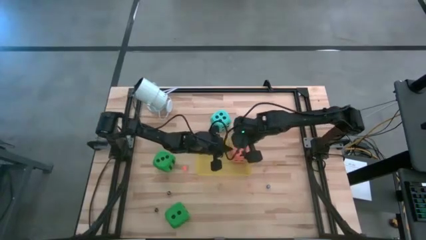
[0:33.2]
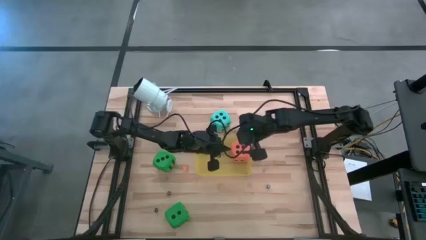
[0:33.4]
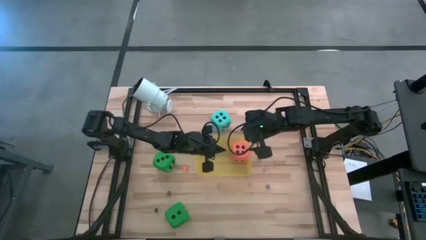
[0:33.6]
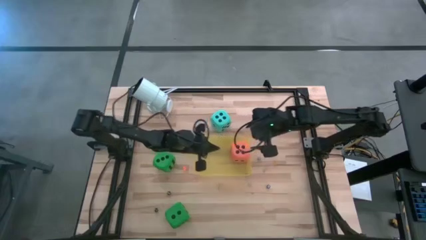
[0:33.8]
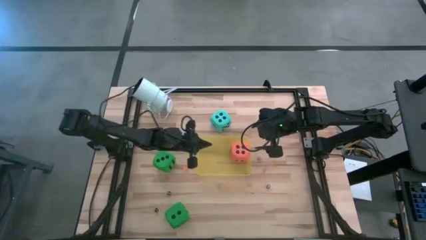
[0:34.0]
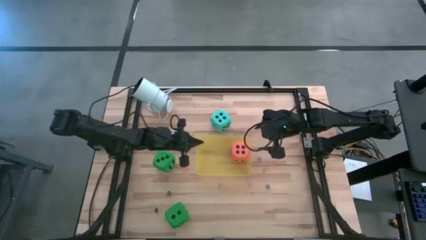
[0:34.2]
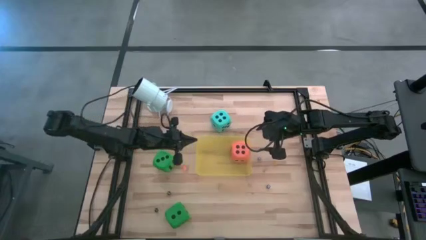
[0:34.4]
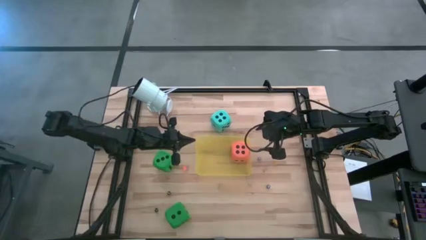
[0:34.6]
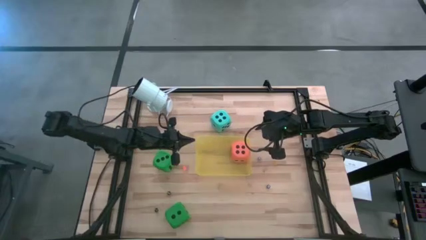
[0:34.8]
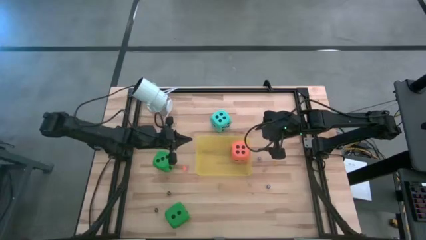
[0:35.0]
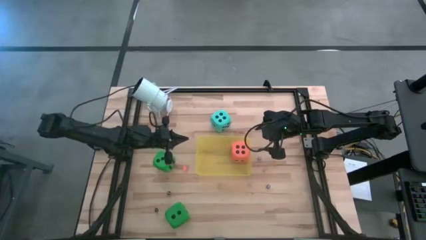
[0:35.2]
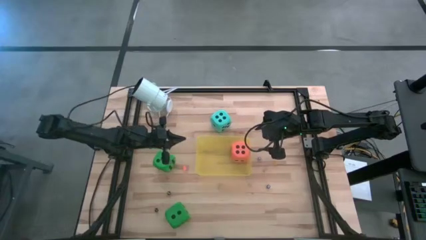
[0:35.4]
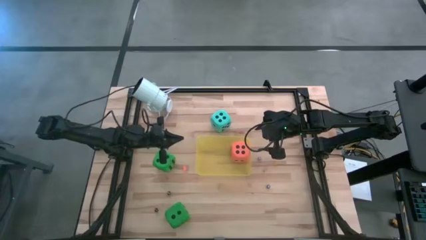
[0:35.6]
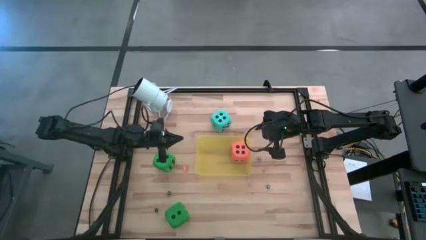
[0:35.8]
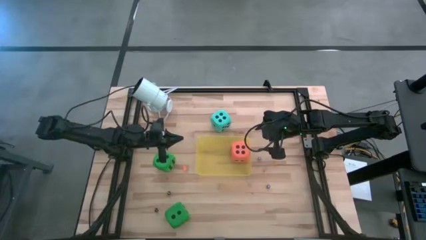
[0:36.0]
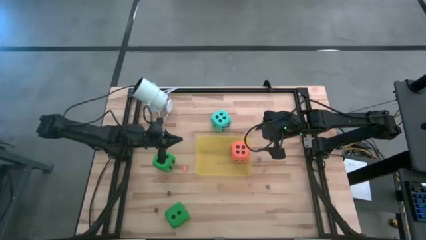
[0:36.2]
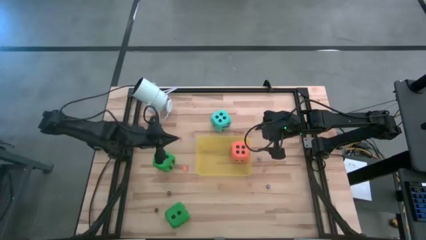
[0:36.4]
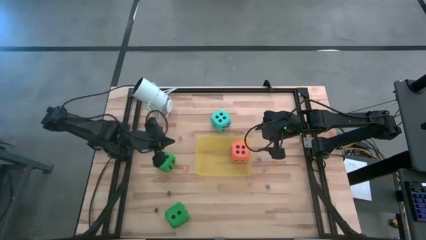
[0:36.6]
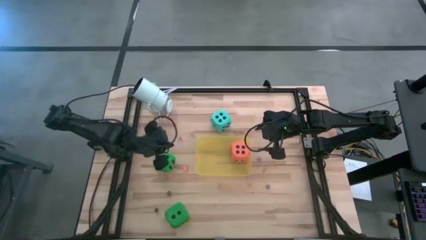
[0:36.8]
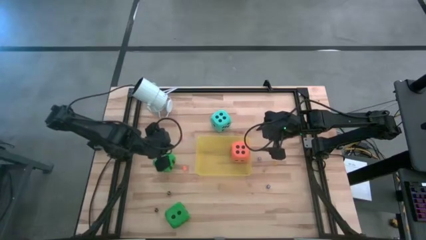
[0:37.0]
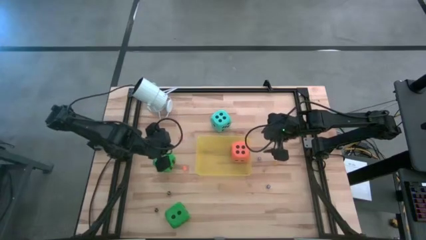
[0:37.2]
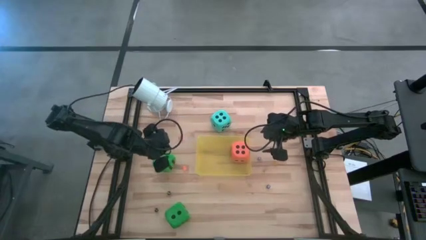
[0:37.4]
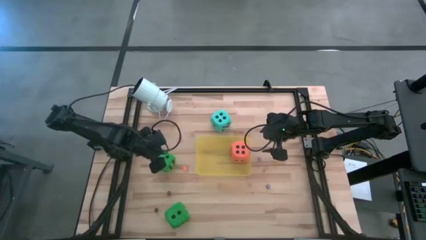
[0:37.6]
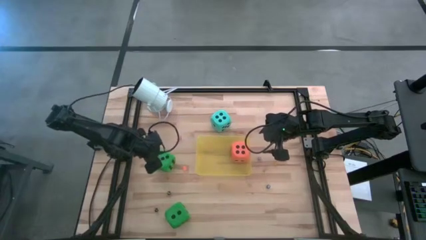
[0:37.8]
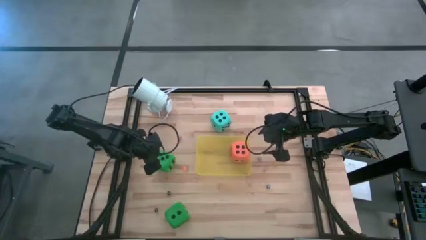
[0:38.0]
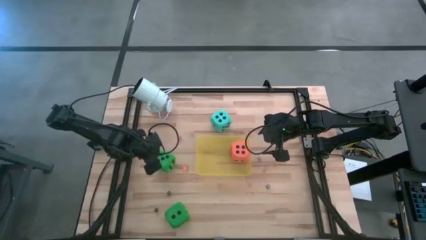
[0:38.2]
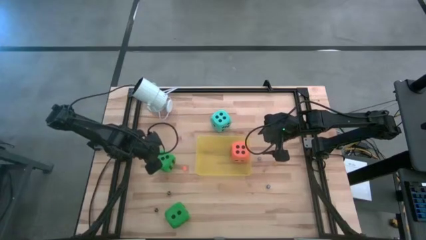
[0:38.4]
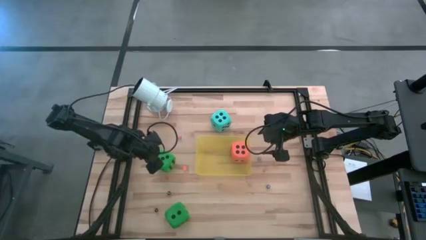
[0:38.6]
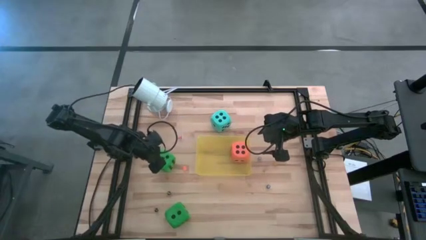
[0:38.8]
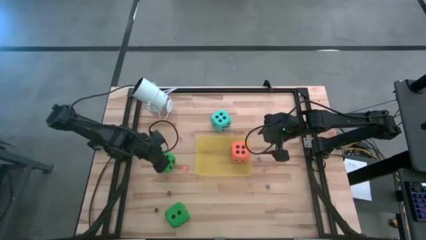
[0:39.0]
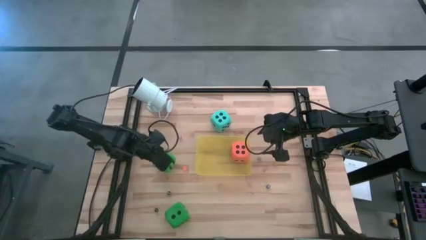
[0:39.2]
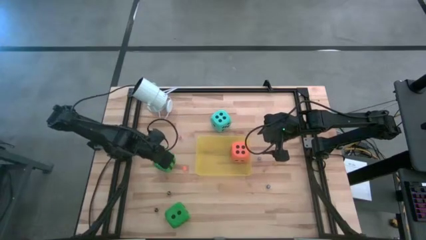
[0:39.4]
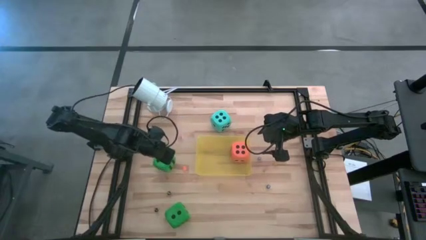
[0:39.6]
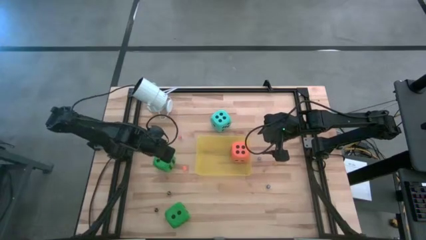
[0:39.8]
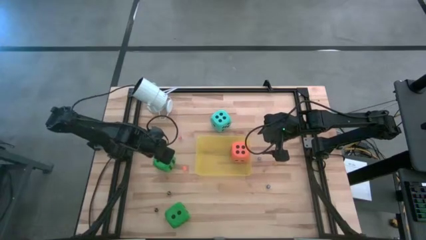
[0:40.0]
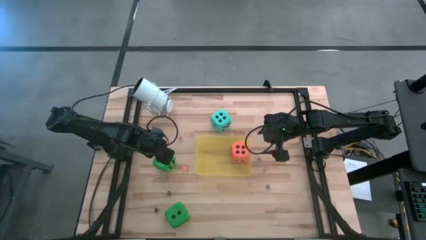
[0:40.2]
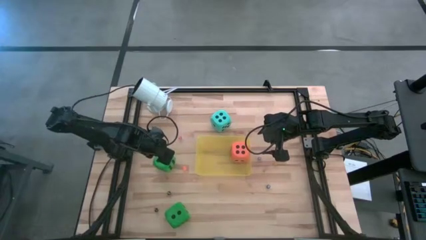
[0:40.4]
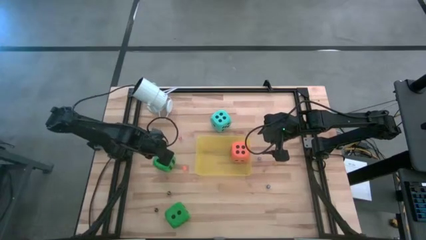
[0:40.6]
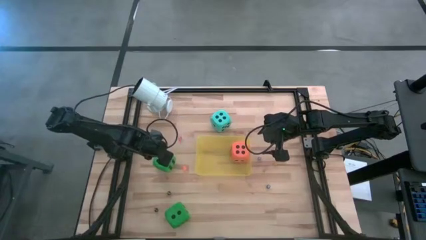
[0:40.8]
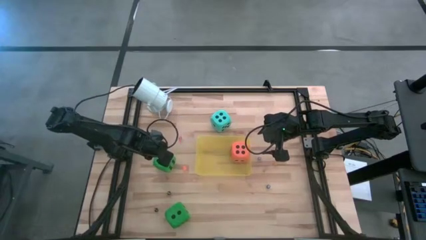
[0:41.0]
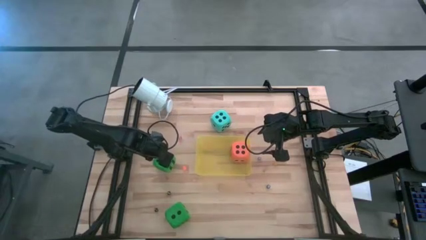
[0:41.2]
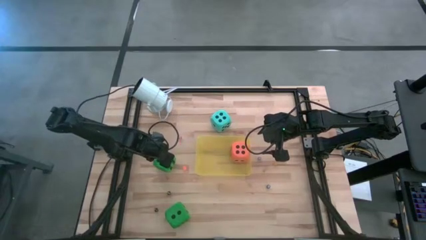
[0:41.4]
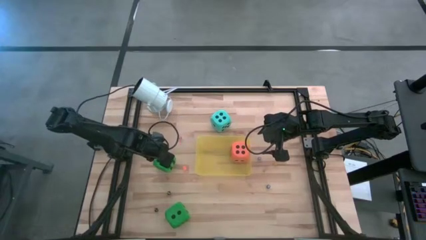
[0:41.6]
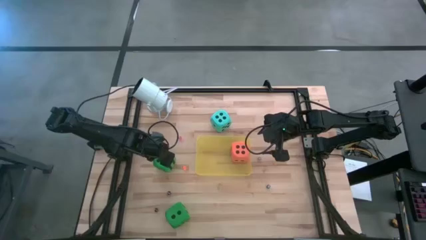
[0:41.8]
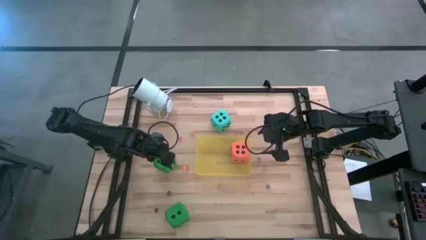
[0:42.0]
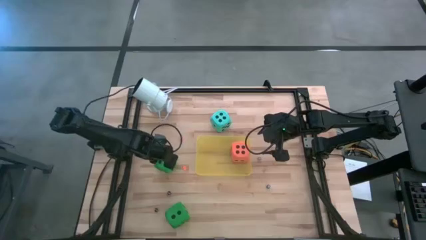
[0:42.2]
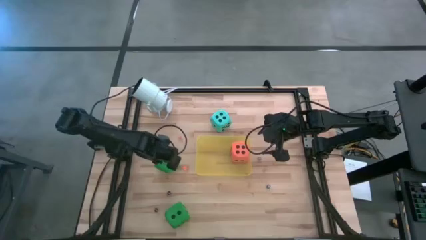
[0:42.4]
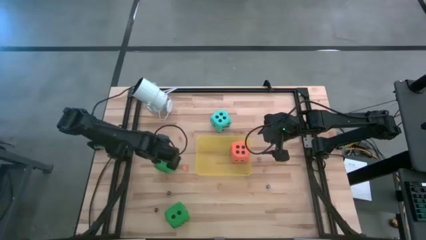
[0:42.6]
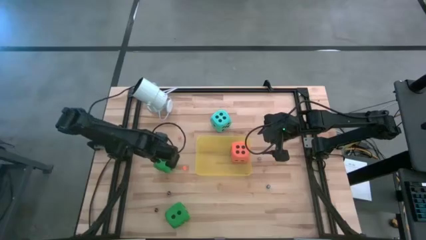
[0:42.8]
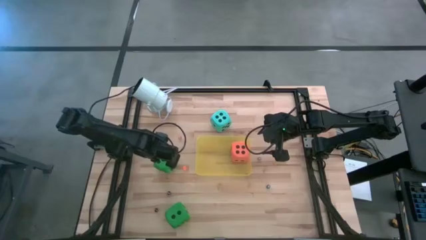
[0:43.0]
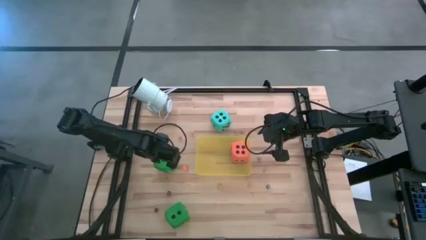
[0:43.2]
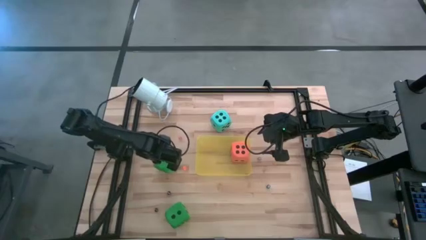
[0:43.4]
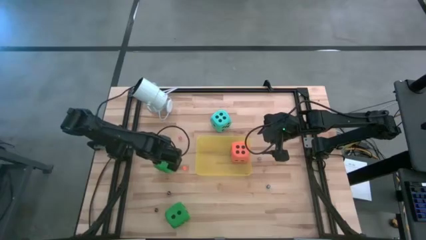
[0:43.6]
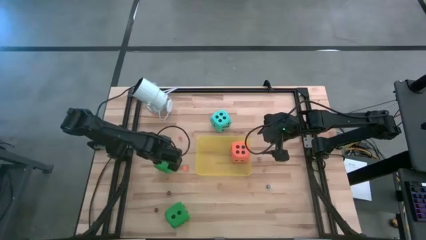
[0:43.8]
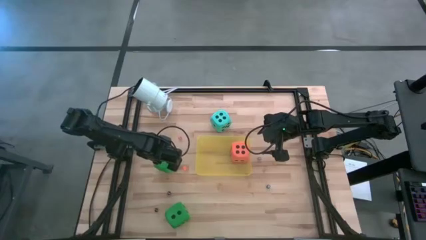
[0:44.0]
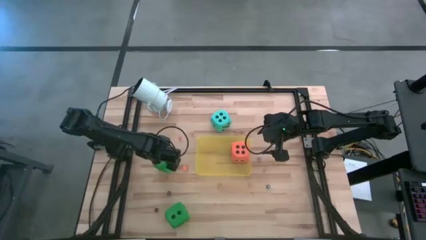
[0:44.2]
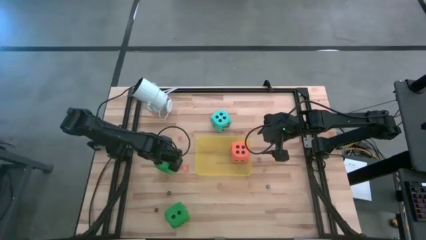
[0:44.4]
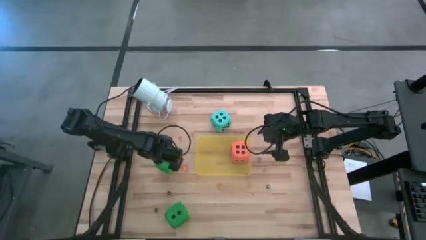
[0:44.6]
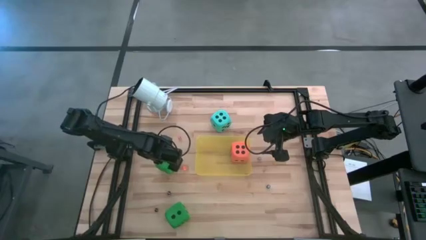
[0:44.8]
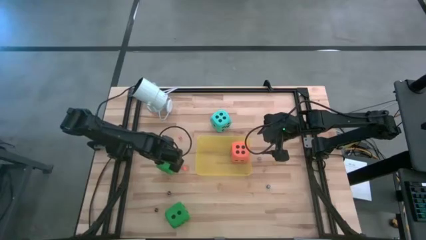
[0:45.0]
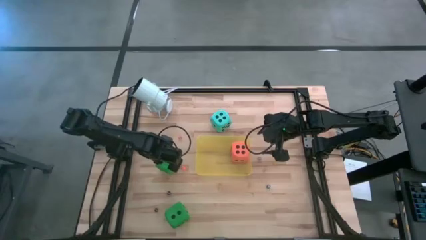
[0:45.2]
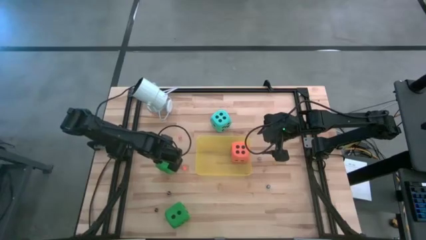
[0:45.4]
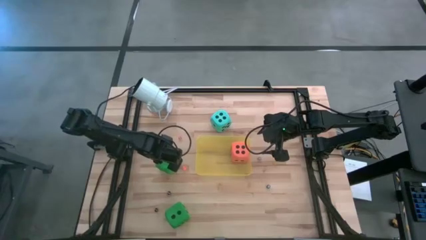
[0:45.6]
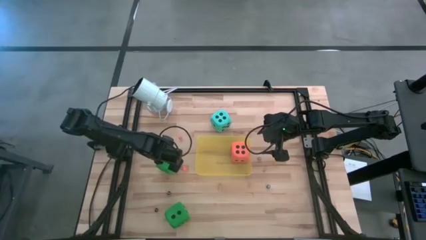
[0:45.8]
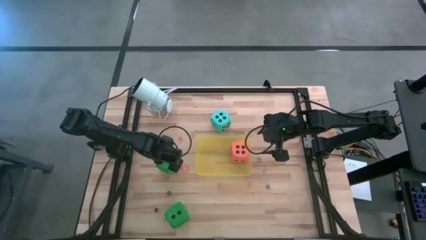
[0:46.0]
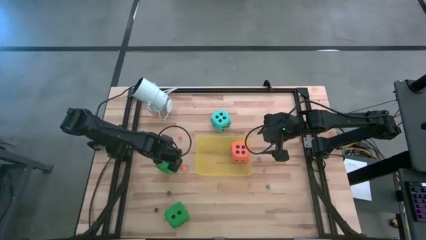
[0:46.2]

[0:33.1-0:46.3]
Task: Pick & Place Dice
Put the top big green dice into the yellow bin

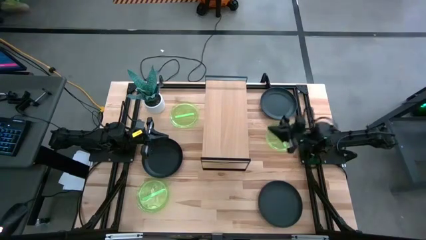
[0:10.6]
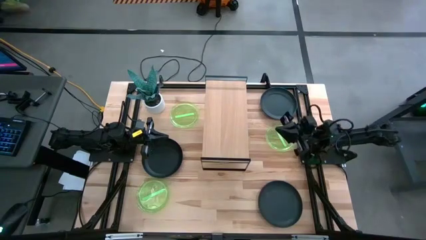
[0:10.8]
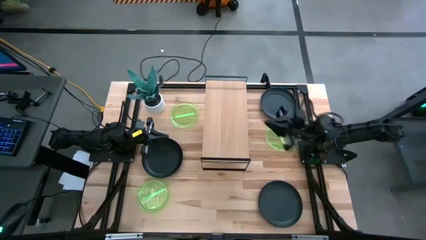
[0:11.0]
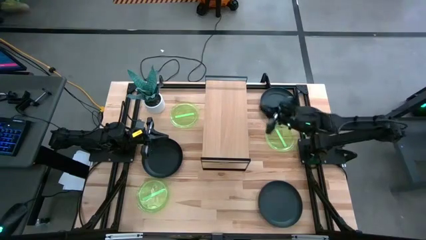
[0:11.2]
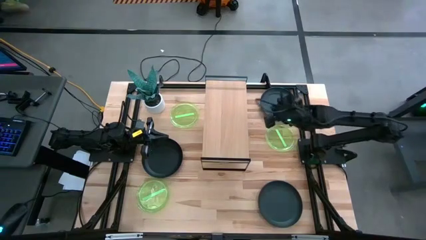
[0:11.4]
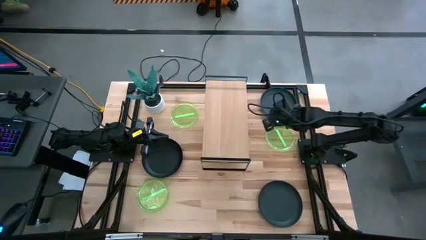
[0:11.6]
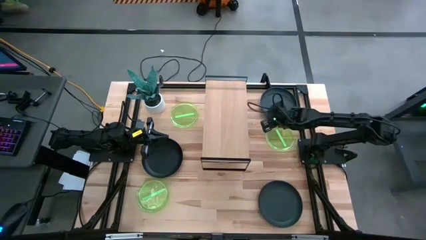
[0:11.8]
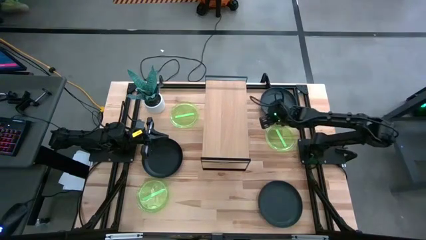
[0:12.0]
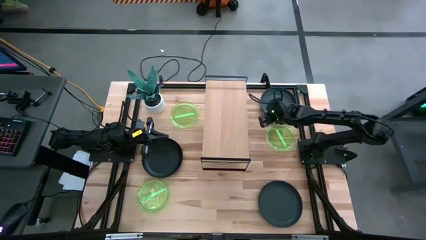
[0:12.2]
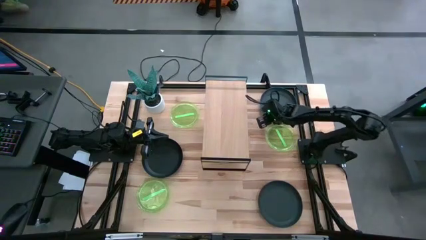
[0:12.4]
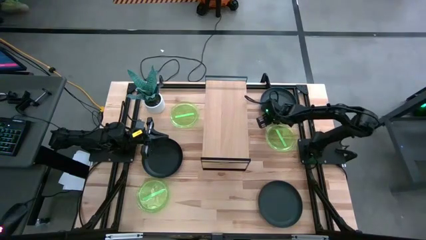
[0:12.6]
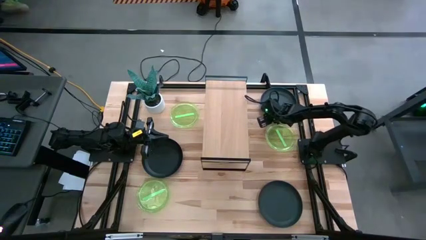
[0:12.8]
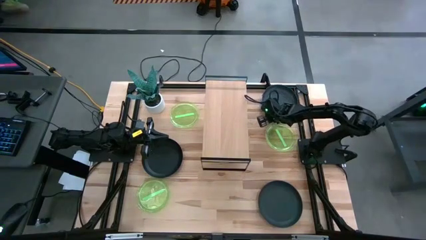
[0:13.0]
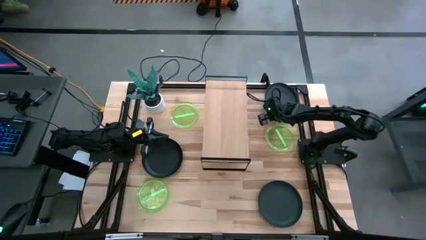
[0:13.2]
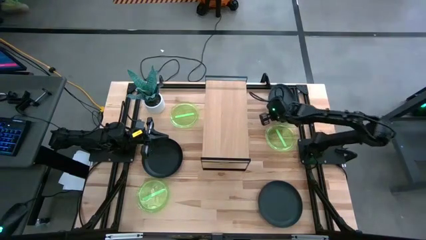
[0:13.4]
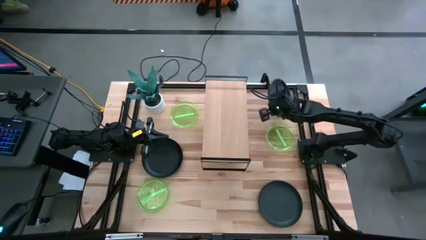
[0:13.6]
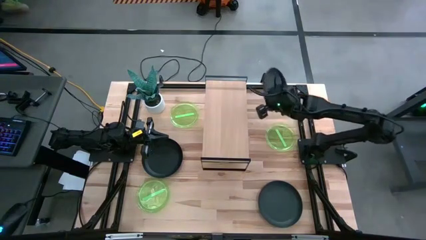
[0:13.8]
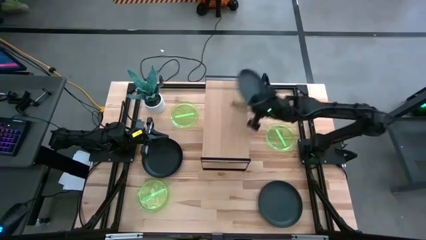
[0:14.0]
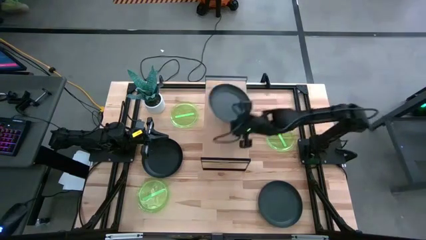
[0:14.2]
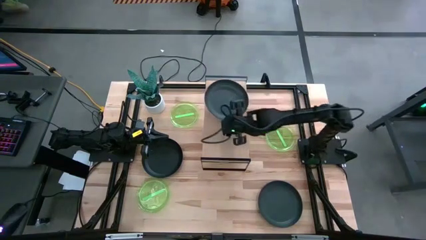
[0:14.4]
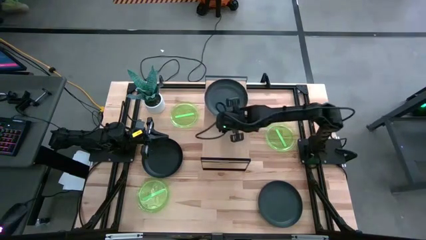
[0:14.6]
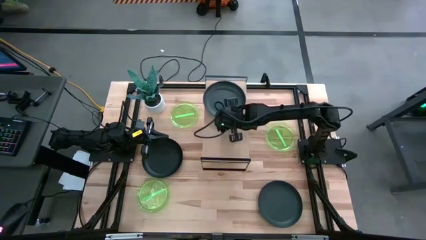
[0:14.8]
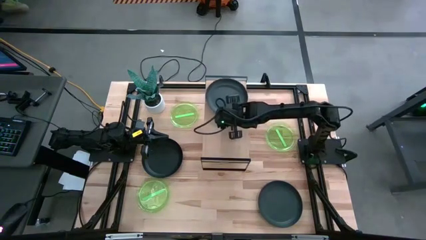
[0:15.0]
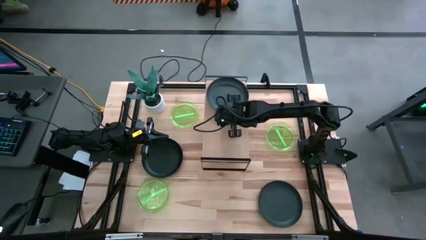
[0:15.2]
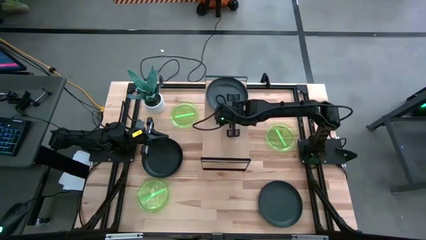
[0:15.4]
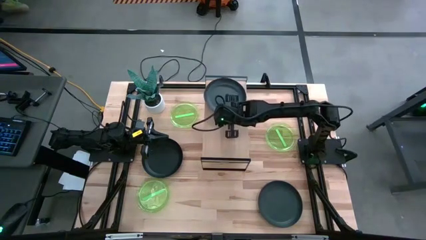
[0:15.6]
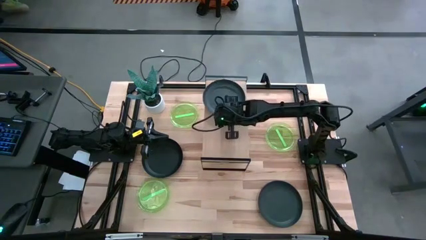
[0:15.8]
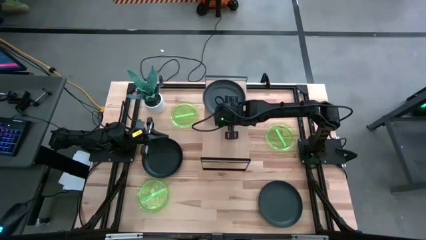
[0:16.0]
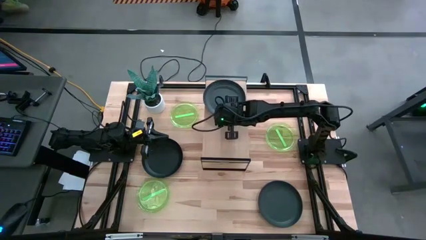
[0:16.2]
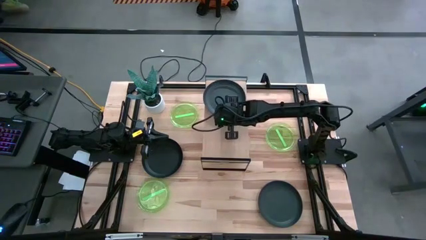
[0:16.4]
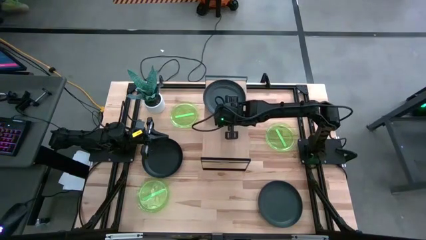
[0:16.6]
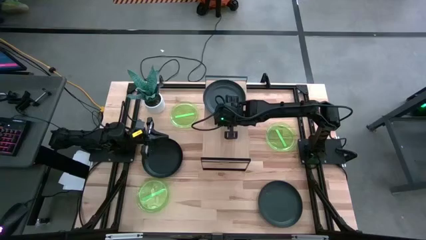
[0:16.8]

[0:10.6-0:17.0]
Task: Place and stack plates onto a shelf
Put the top right black plate on the shelf
